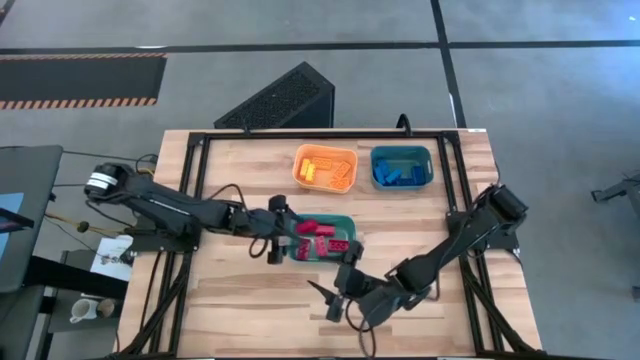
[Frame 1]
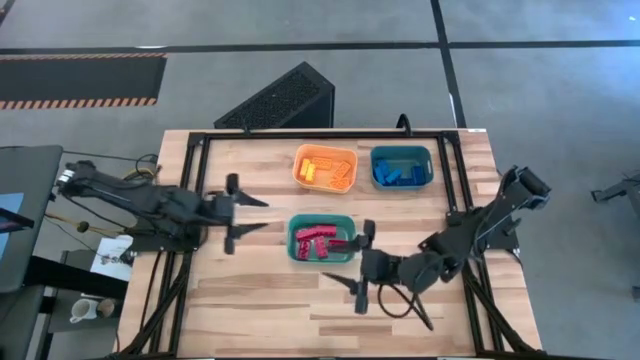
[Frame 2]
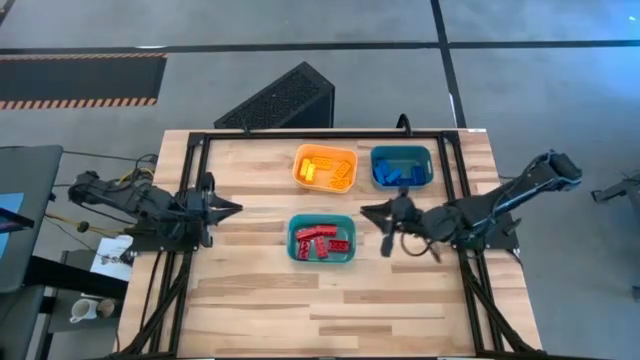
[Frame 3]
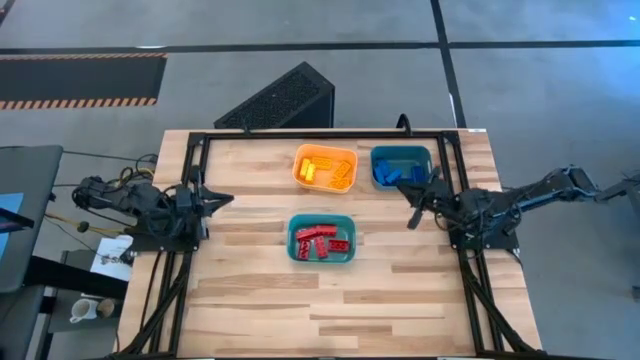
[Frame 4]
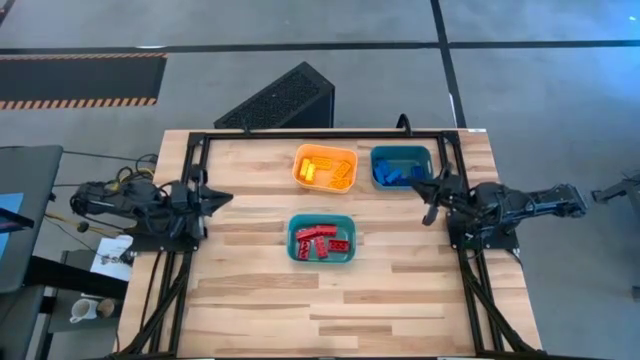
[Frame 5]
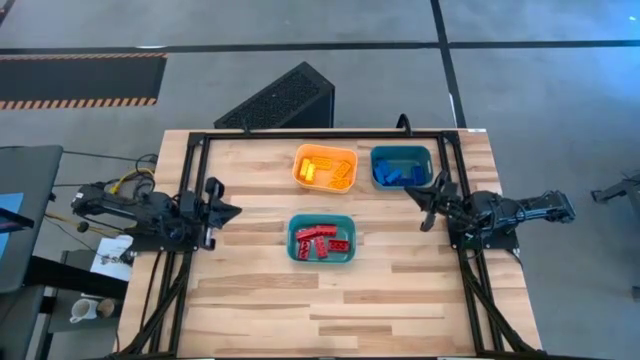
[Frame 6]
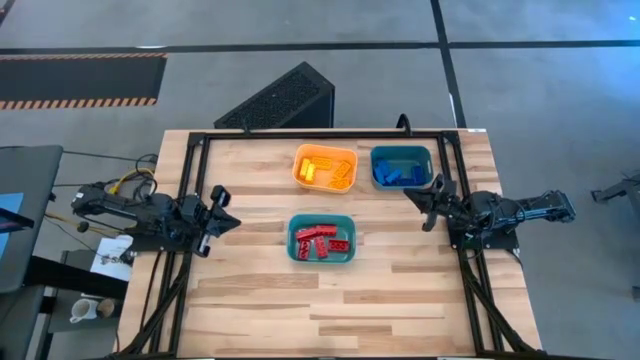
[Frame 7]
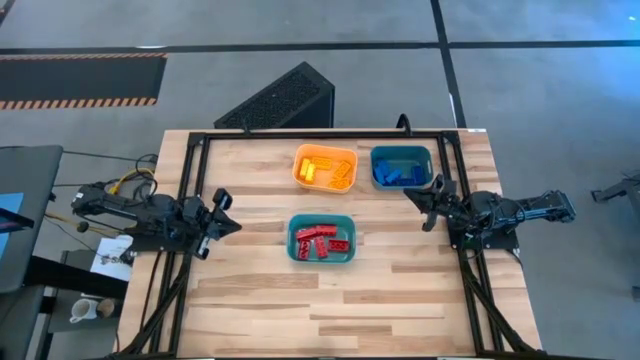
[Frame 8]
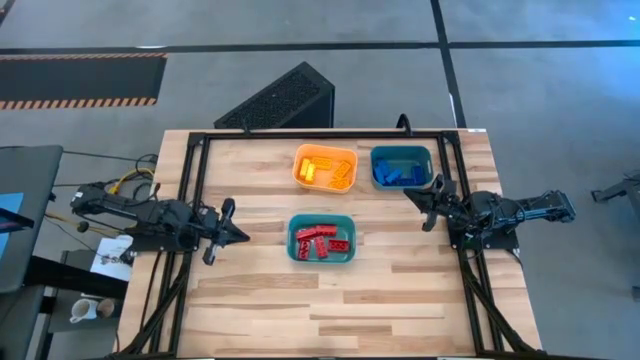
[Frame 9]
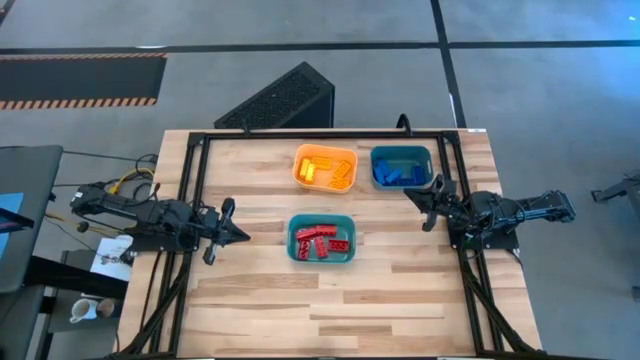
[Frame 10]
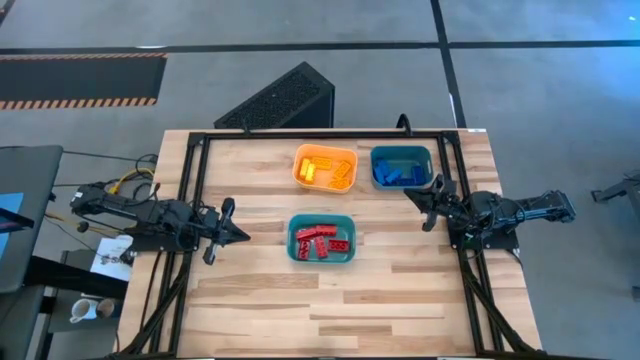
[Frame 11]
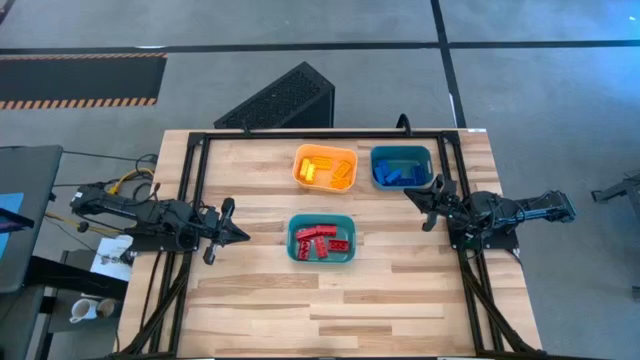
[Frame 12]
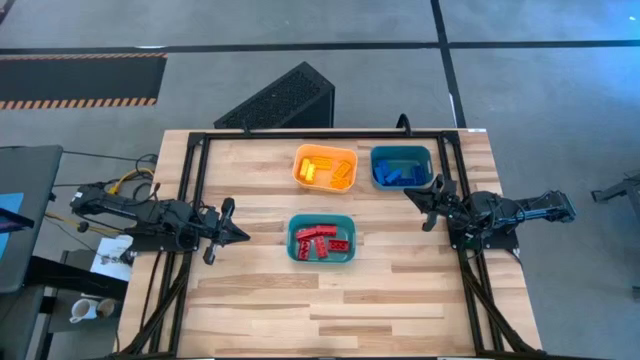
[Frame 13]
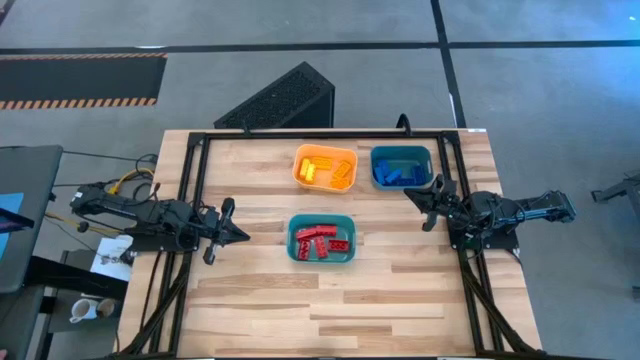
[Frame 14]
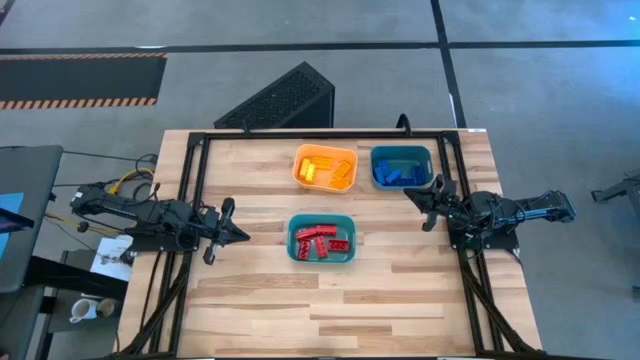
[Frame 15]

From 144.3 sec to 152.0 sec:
Task: Sort & place blocks by color
Return to Home Position

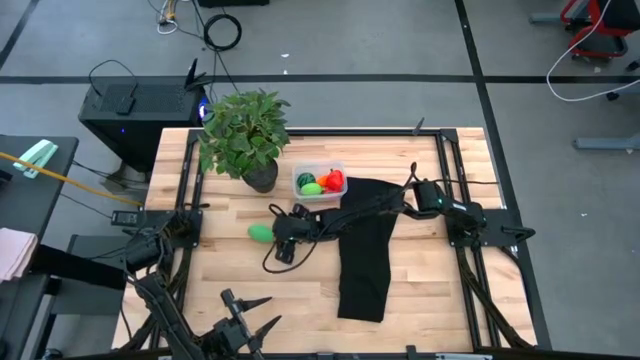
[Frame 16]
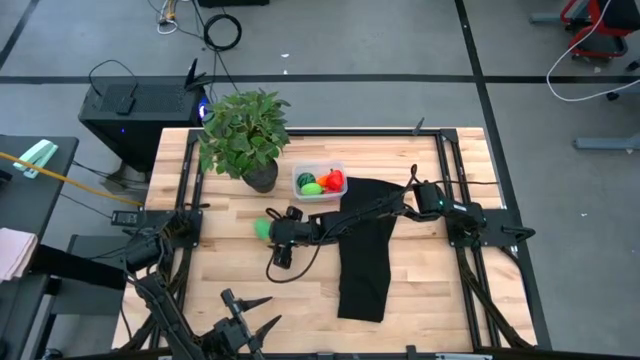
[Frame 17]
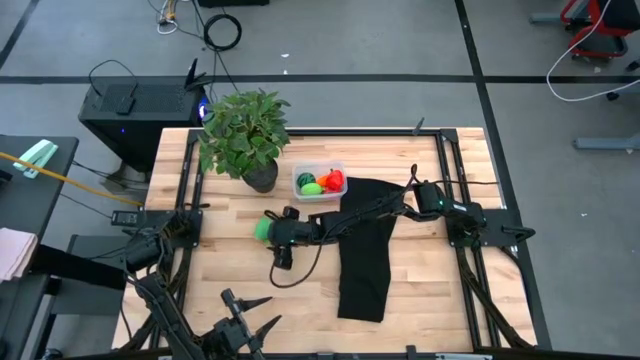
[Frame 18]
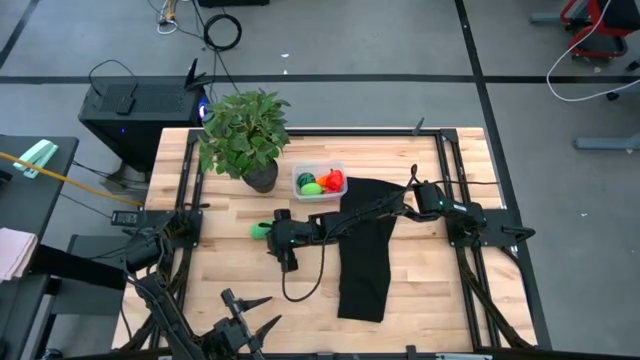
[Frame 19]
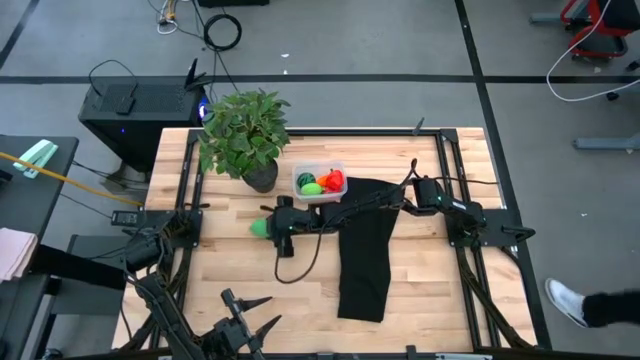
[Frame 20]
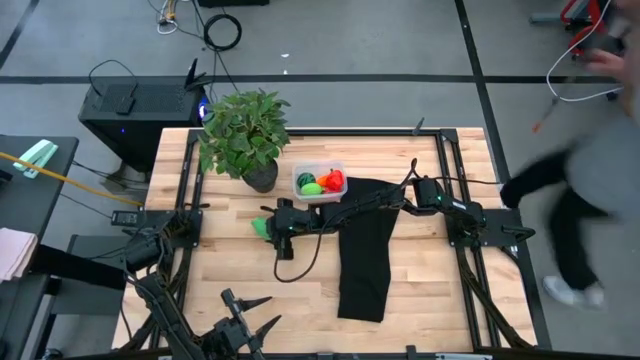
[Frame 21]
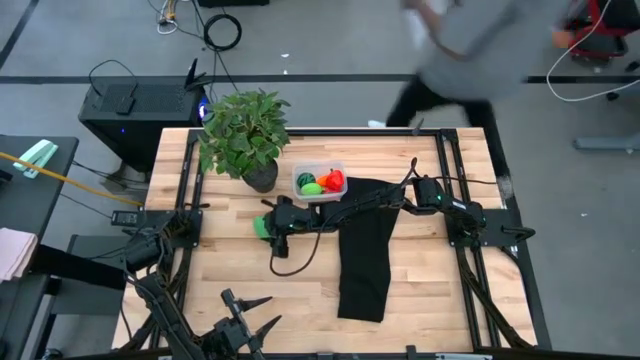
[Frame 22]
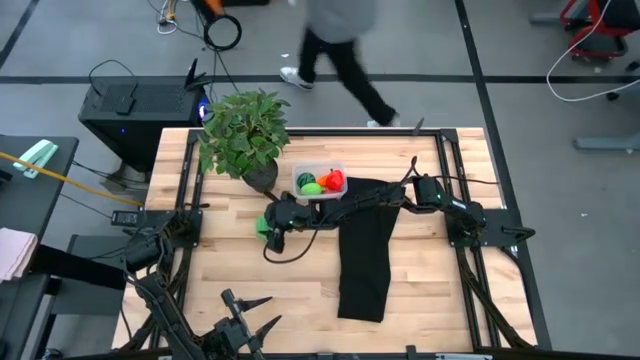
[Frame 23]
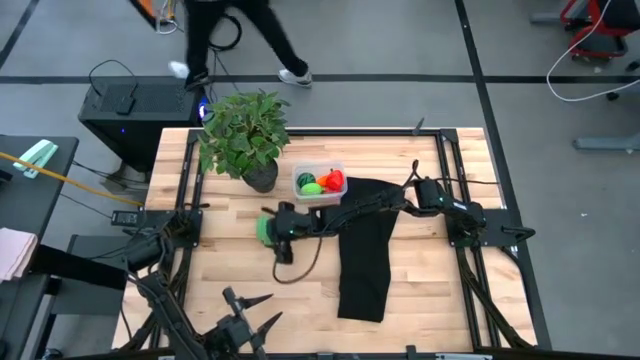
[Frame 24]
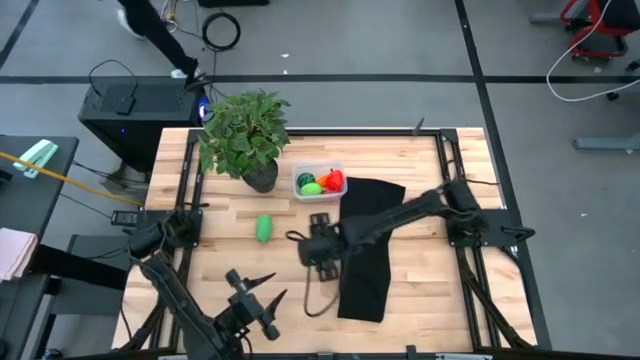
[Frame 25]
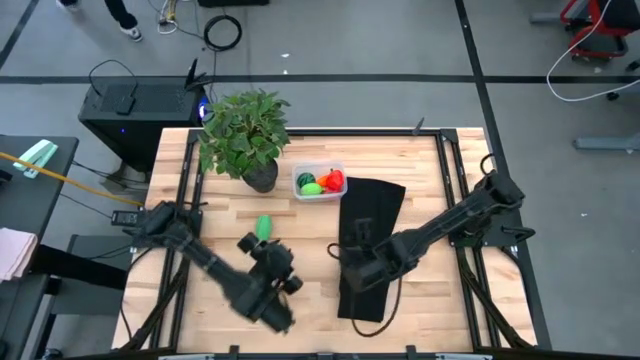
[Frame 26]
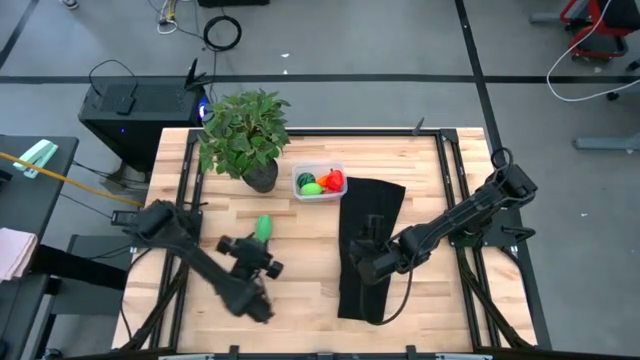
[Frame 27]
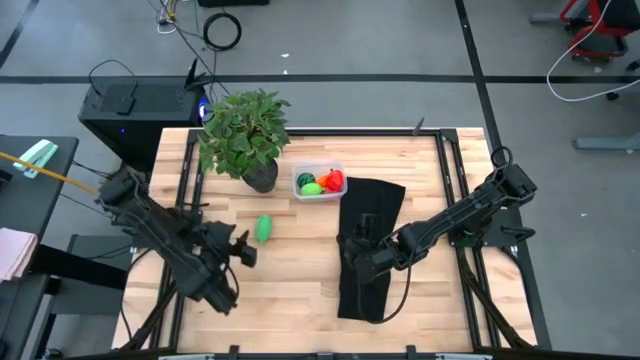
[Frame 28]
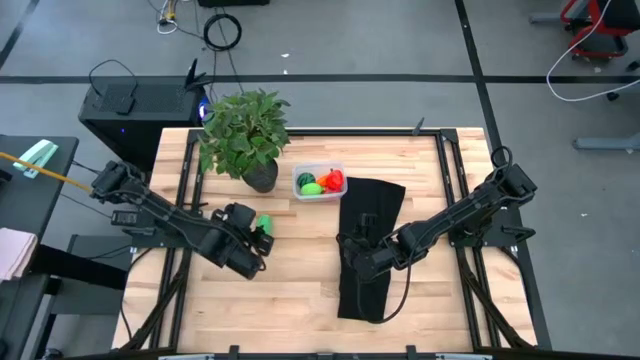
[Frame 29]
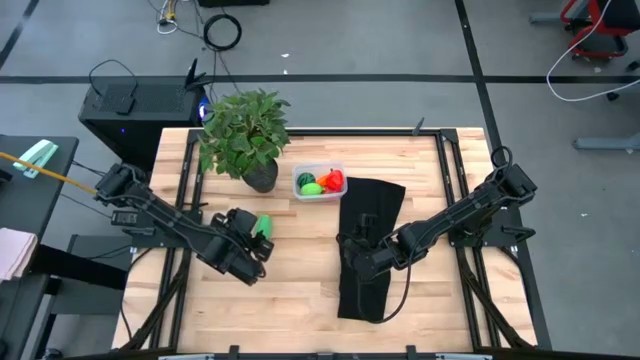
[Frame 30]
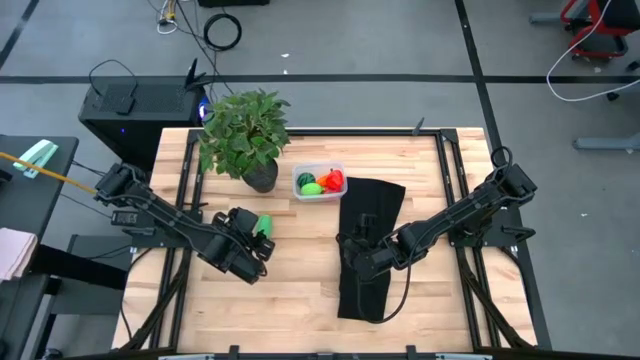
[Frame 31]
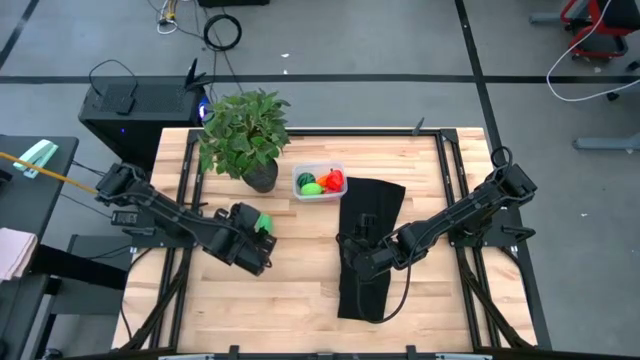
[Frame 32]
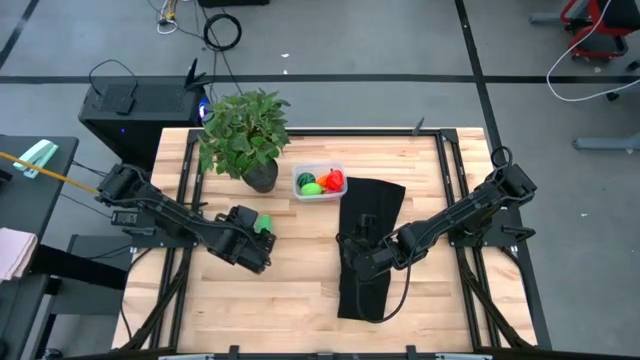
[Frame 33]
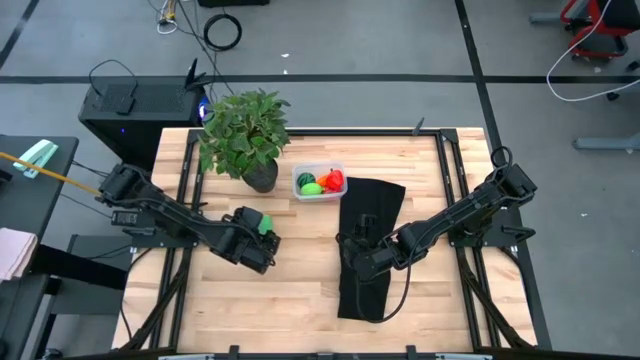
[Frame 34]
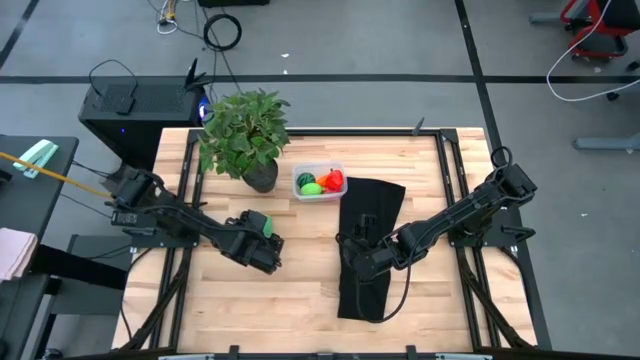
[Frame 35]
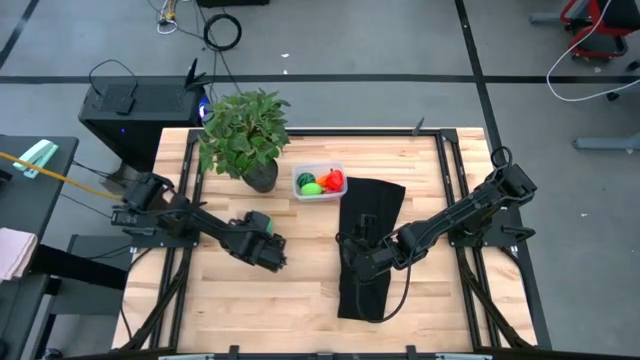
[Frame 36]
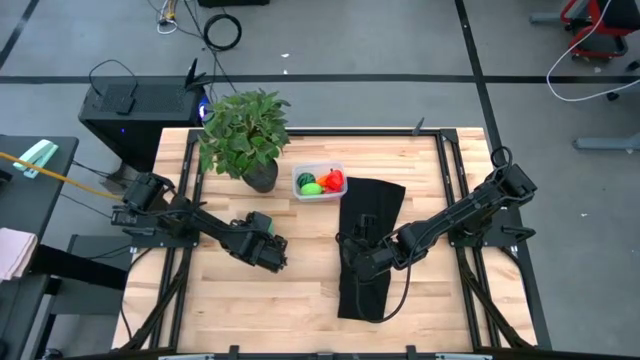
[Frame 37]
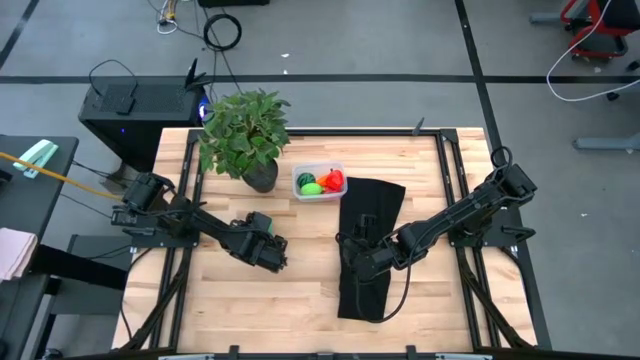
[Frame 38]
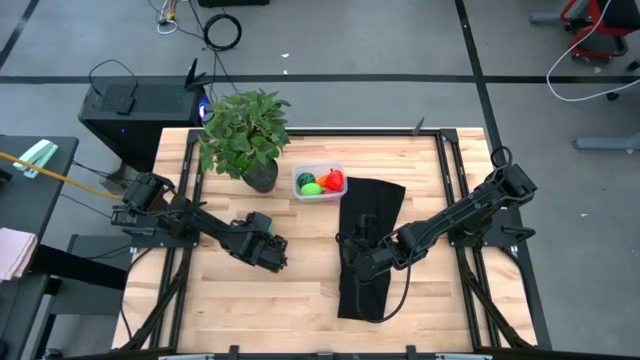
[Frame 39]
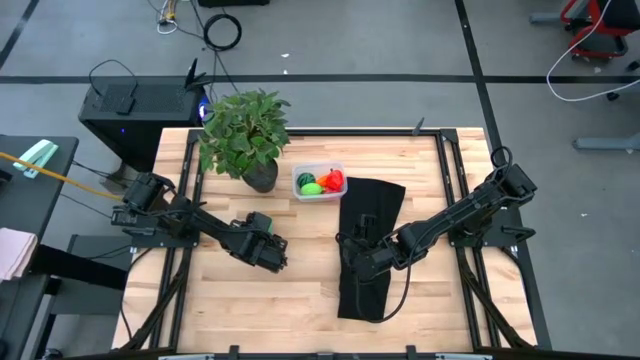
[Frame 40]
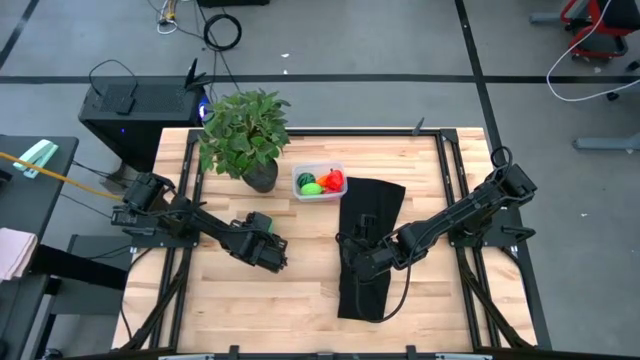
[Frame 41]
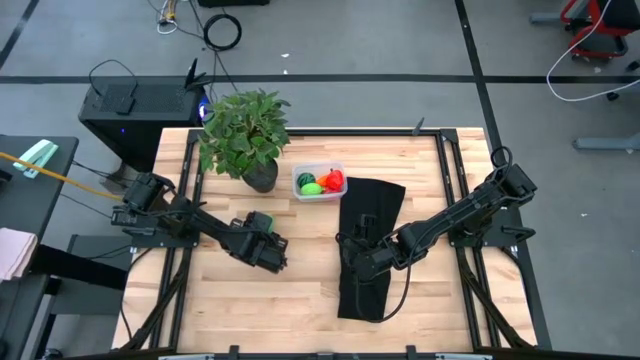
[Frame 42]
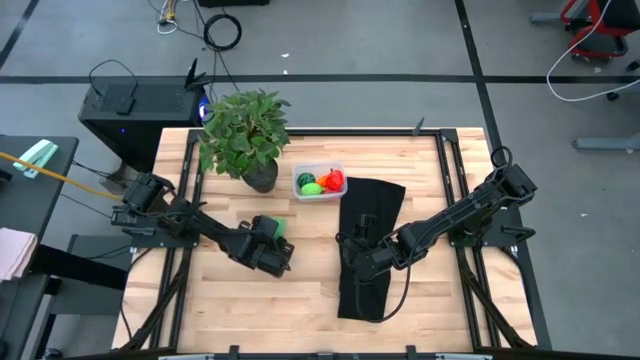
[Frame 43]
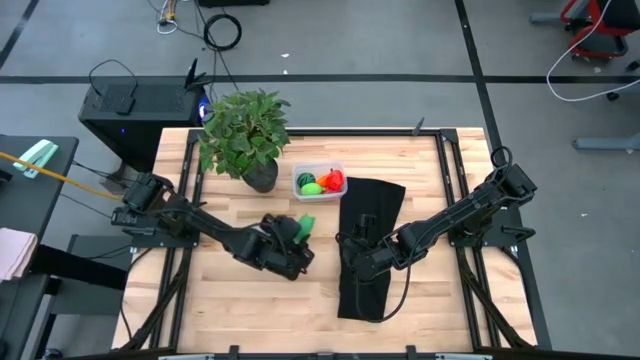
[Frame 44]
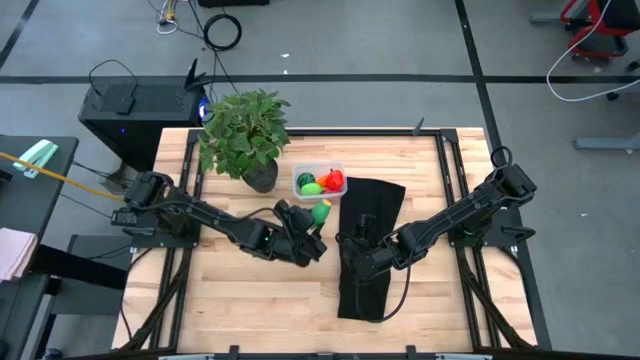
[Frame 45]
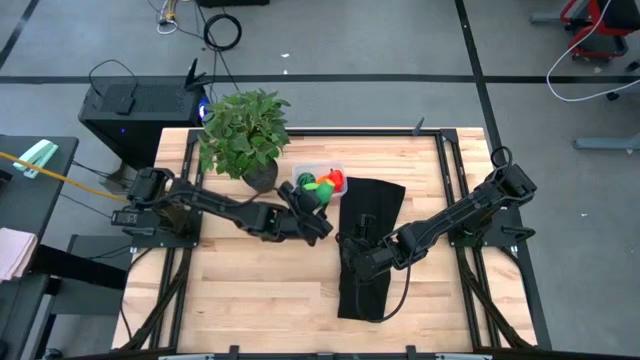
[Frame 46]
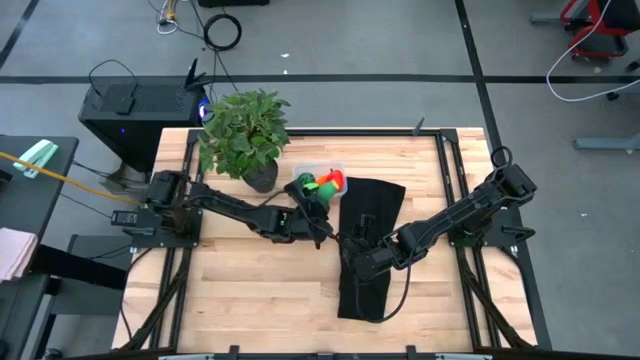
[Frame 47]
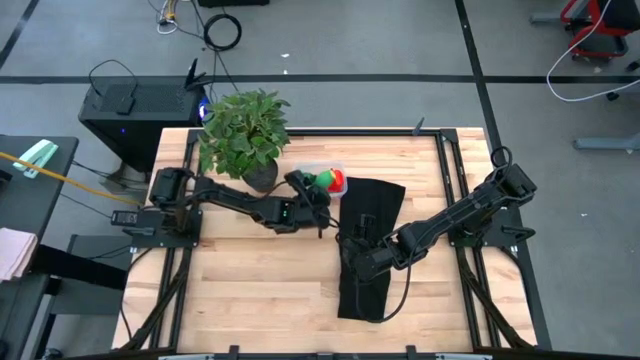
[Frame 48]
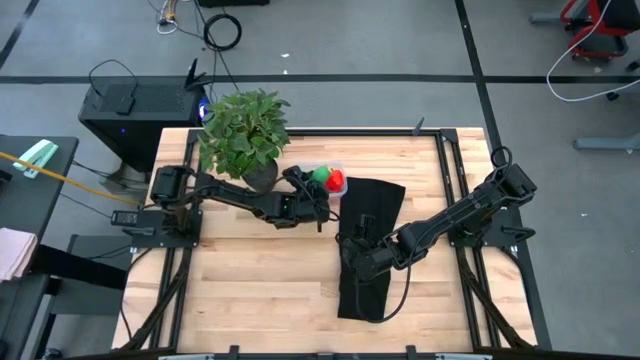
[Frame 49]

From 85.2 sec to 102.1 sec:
Task: Pick and placing Produce into tupperware
Put the green corn into the transparent bin
